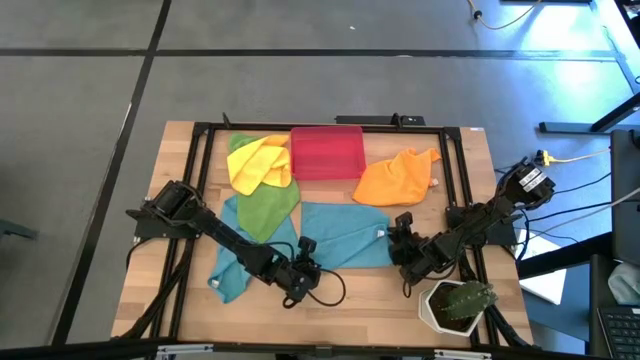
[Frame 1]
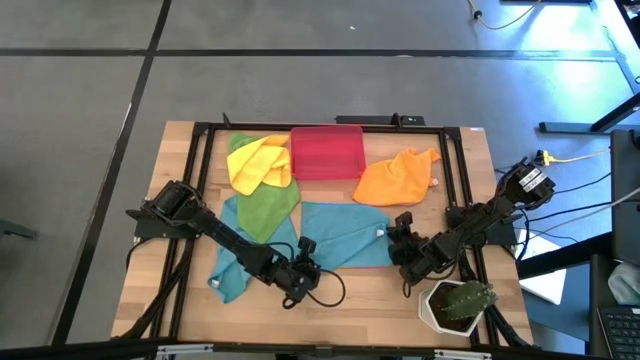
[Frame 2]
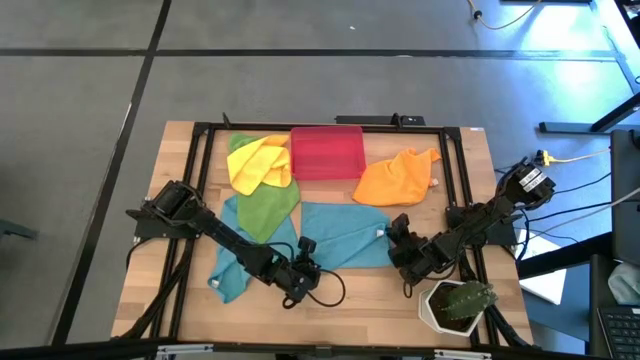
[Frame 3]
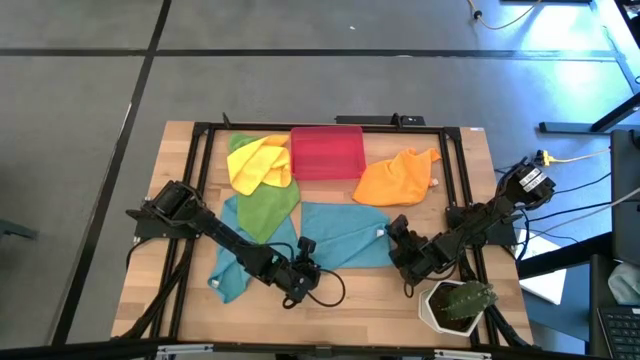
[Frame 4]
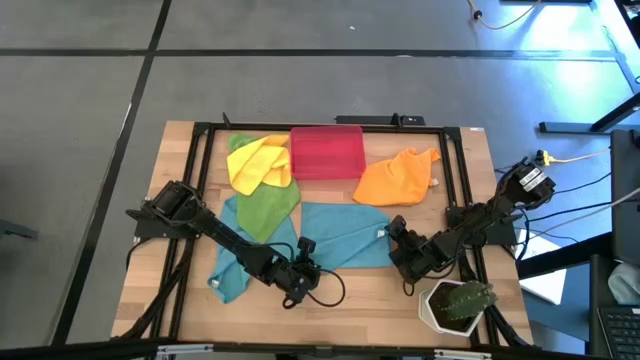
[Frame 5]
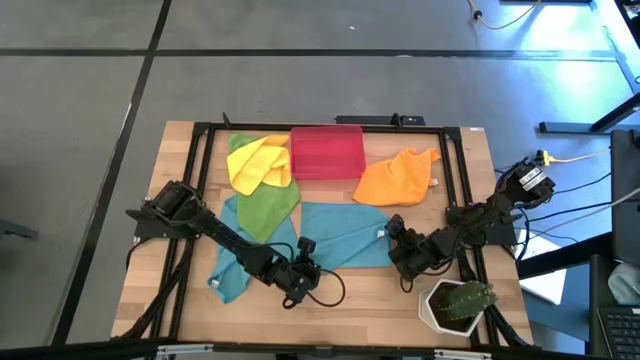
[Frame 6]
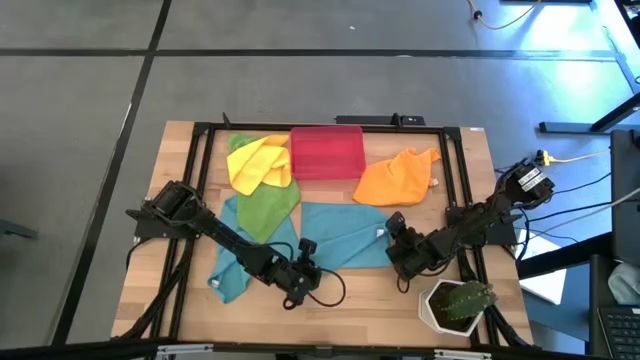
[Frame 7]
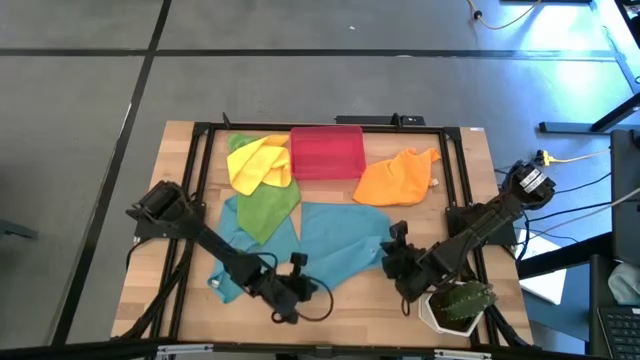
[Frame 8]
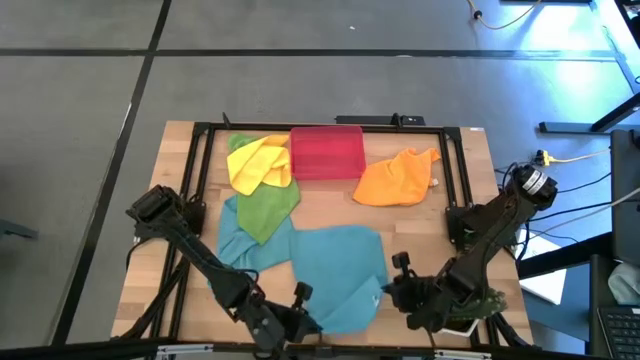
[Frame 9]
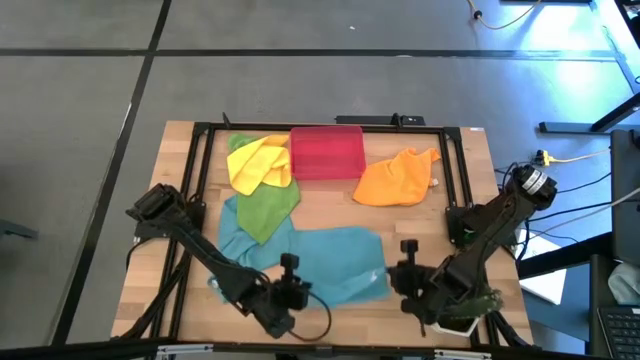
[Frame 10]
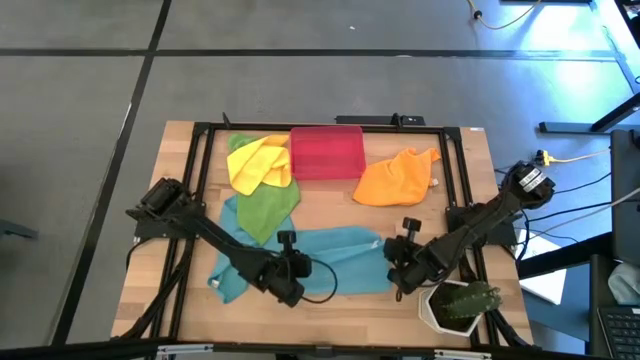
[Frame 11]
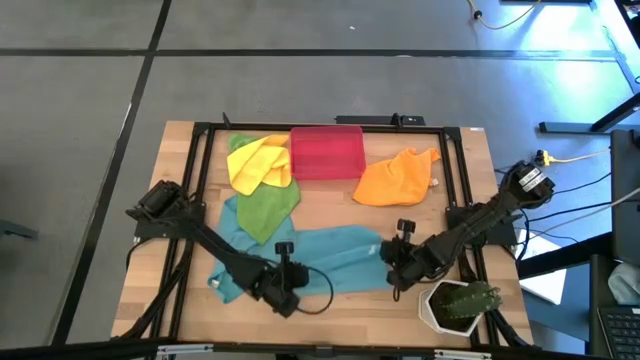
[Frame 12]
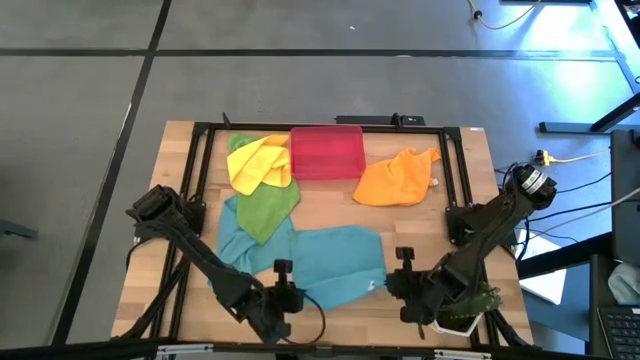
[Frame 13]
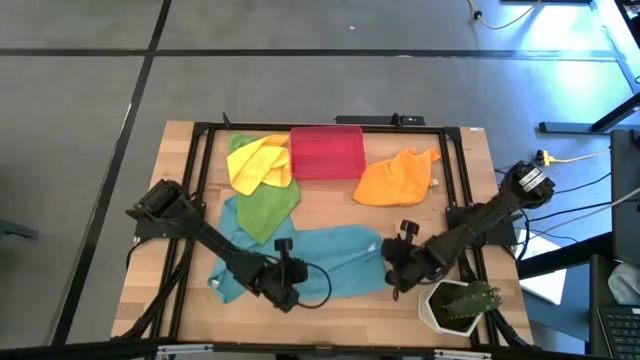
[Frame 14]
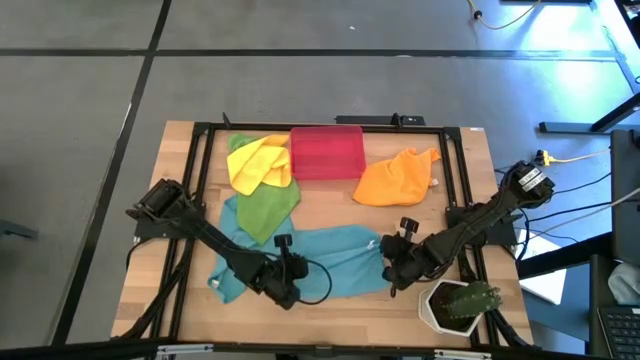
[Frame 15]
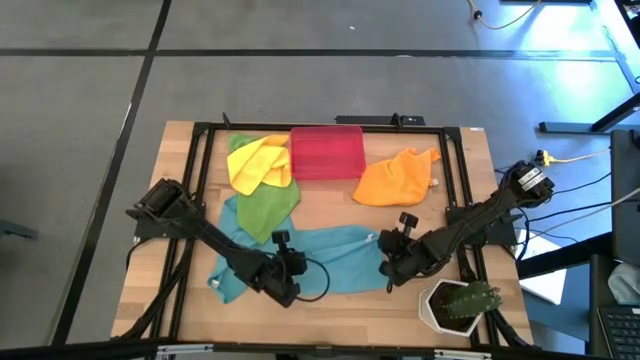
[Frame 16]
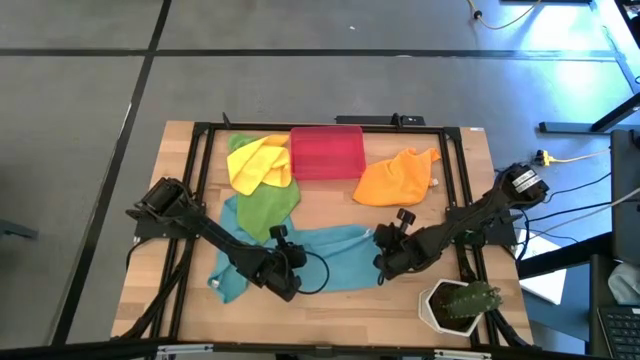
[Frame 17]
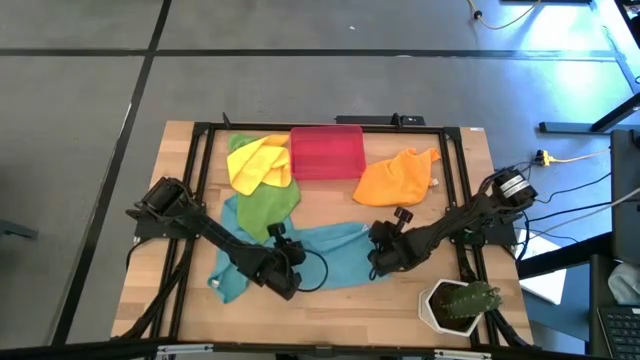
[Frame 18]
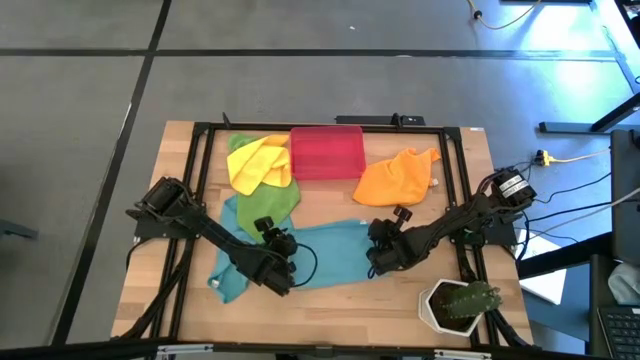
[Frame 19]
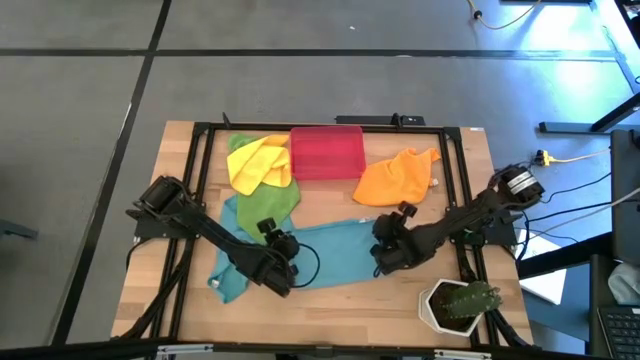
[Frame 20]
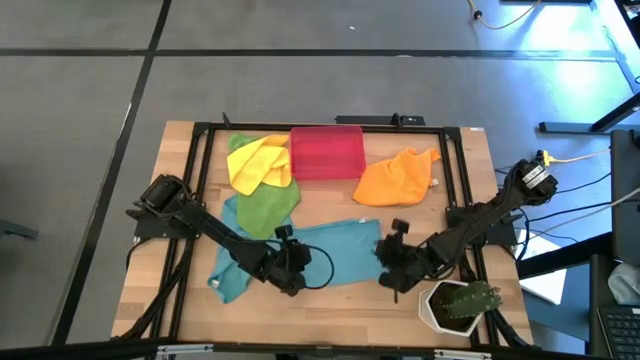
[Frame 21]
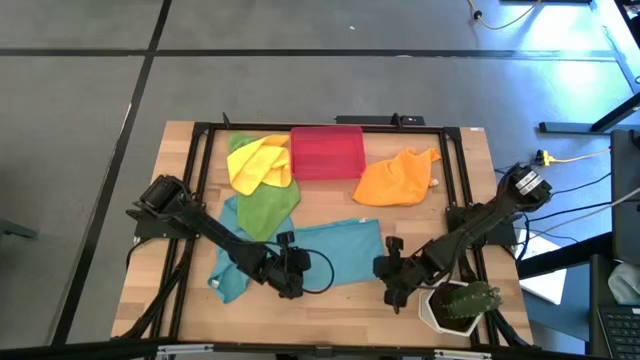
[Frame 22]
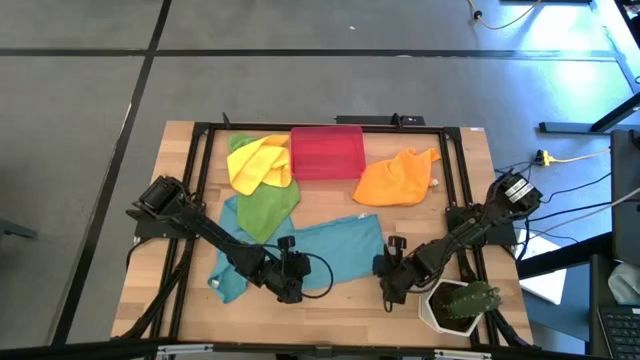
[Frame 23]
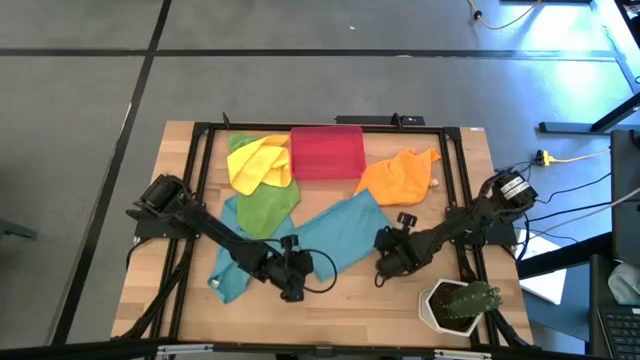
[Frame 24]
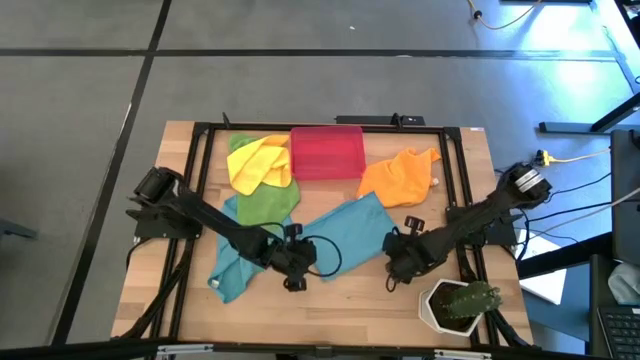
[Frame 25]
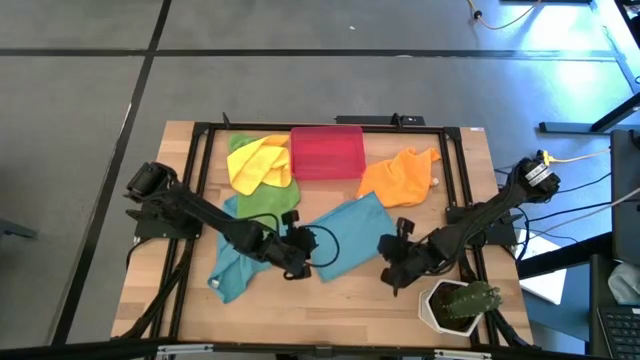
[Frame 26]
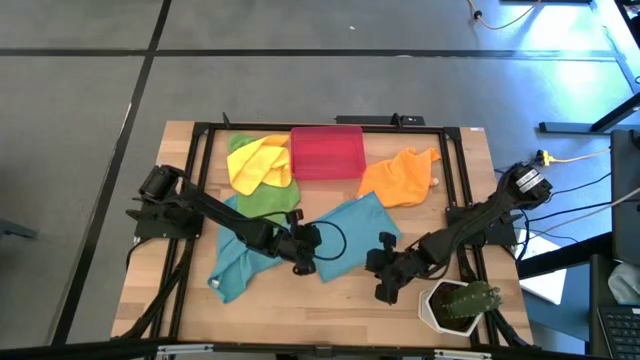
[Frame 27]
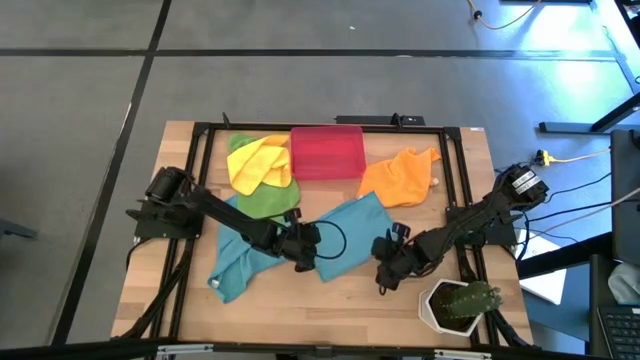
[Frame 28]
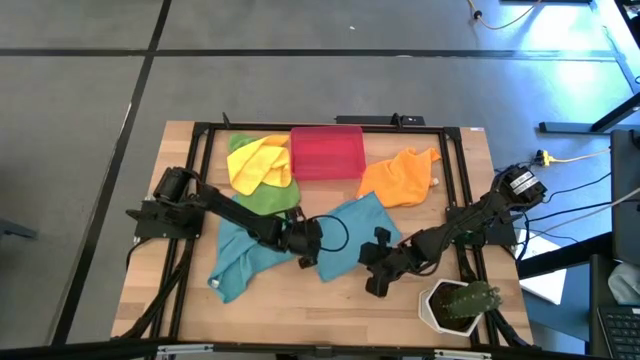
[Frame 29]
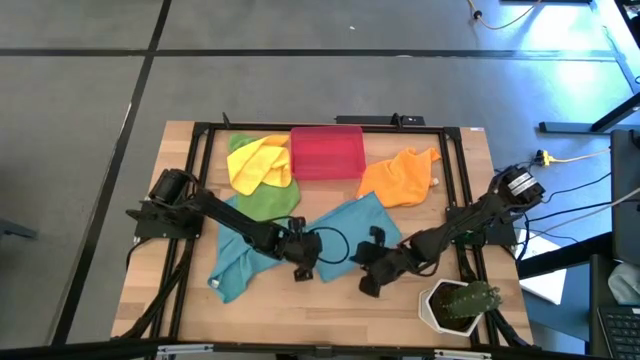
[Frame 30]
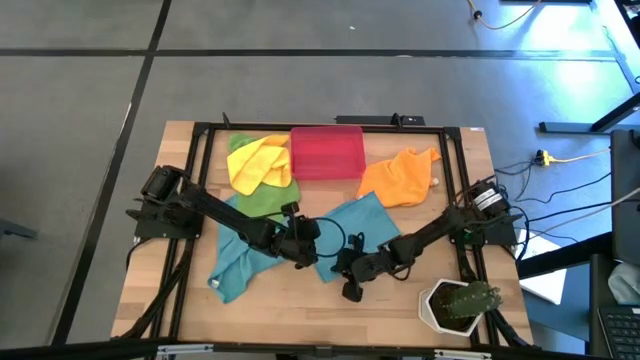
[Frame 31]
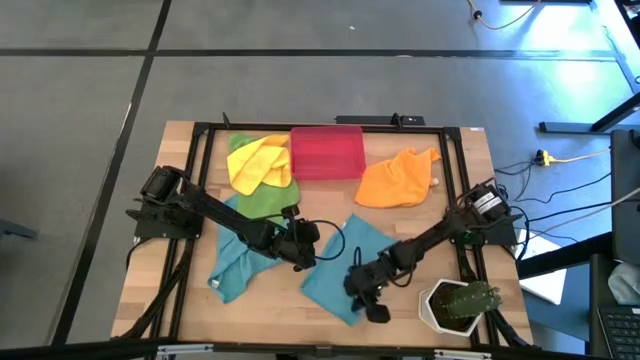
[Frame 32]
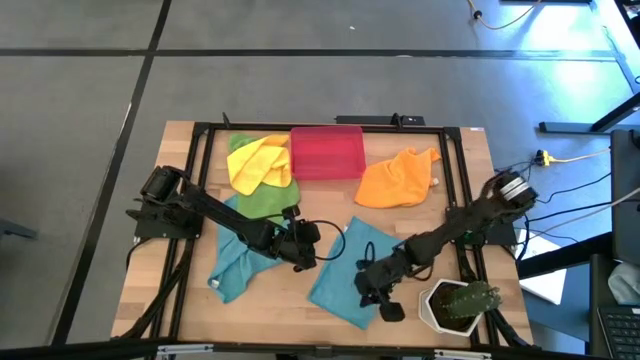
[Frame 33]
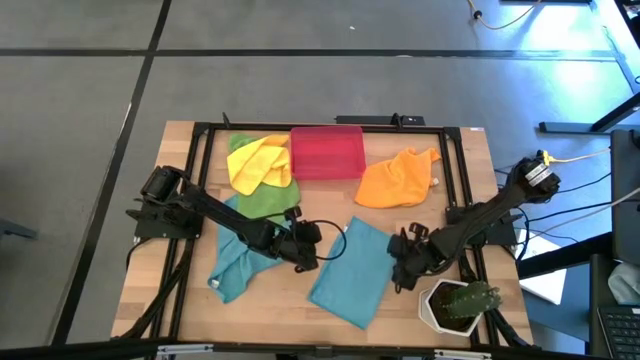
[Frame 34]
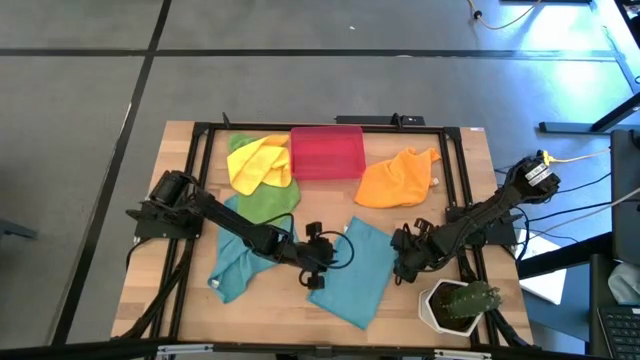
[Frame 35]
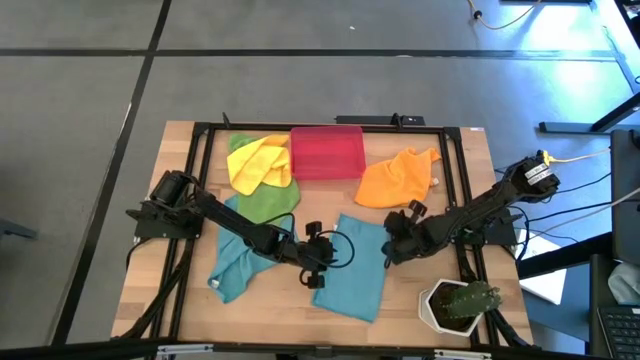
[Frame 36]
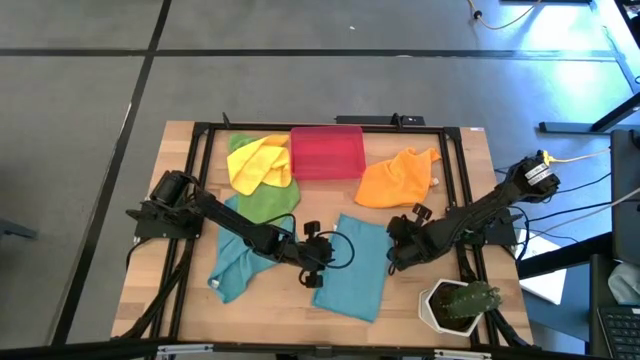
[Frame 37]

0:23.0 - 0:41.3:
Task: Roll microfiber towels into tight, uniform cylinder then place into a basket
Fold the right blue microfiber towel
